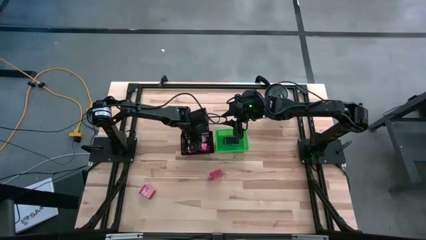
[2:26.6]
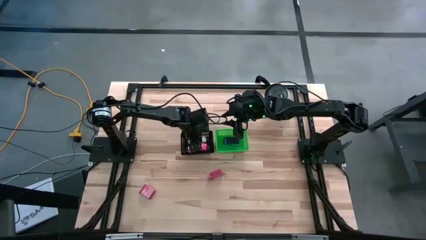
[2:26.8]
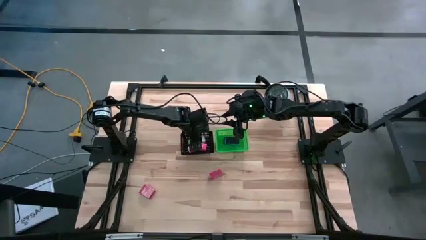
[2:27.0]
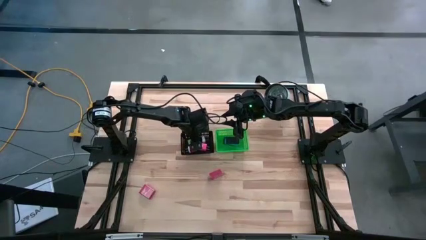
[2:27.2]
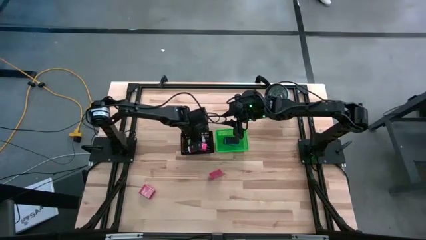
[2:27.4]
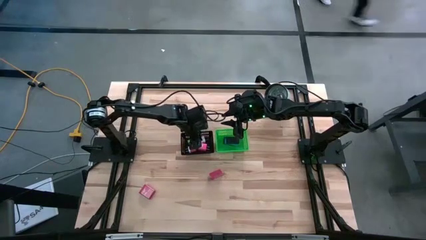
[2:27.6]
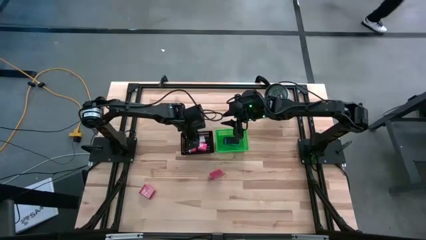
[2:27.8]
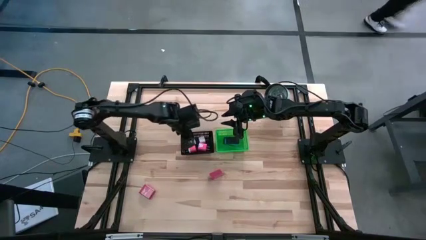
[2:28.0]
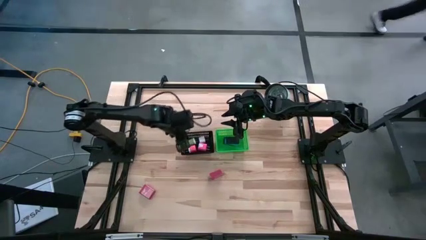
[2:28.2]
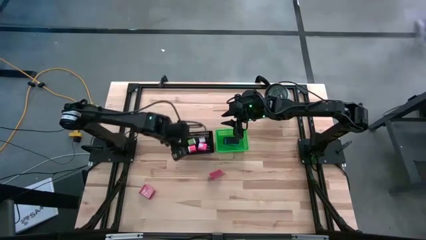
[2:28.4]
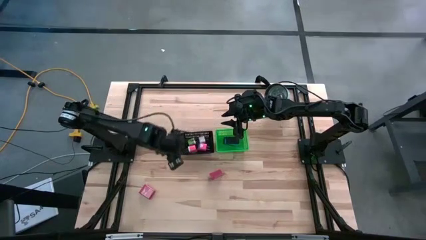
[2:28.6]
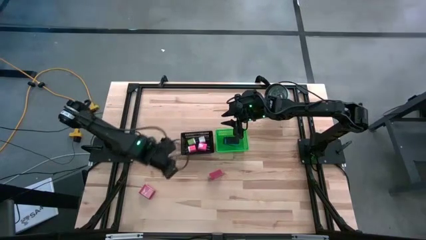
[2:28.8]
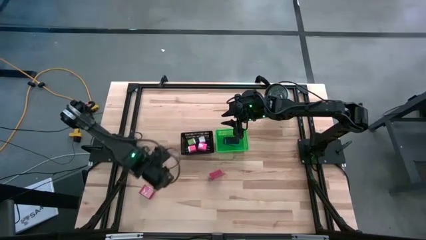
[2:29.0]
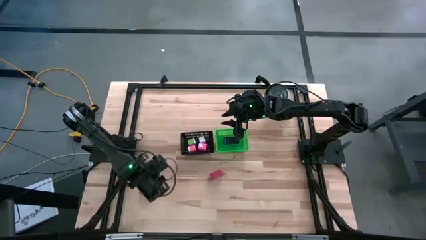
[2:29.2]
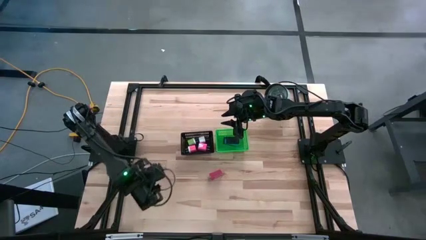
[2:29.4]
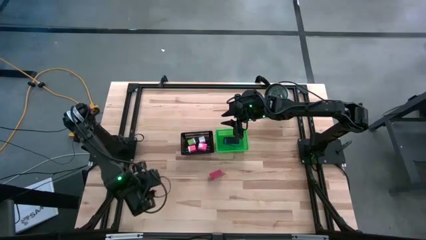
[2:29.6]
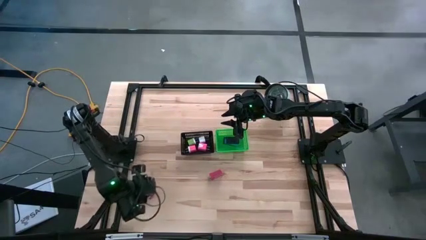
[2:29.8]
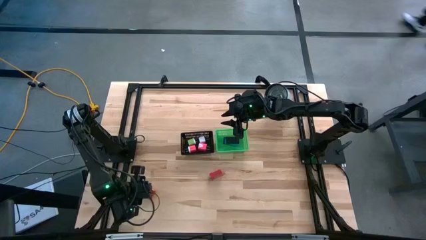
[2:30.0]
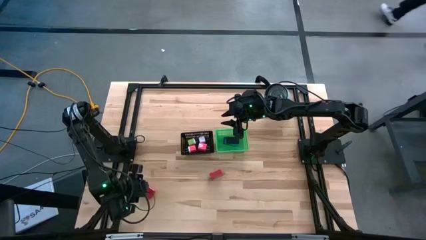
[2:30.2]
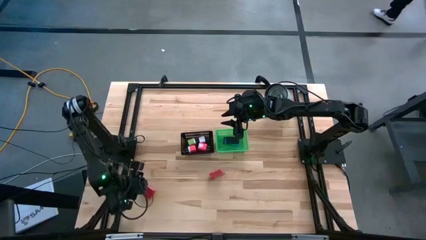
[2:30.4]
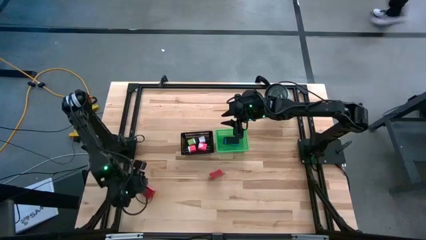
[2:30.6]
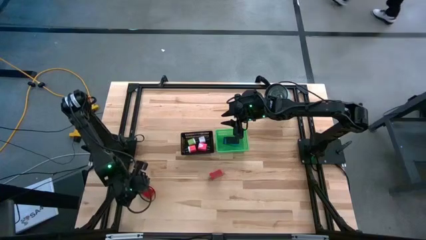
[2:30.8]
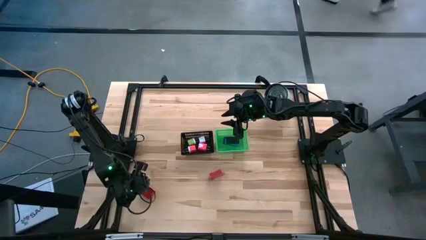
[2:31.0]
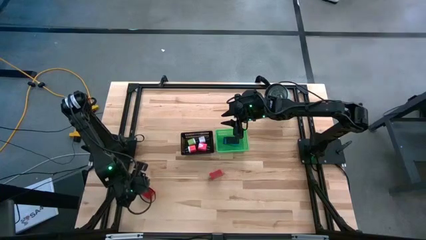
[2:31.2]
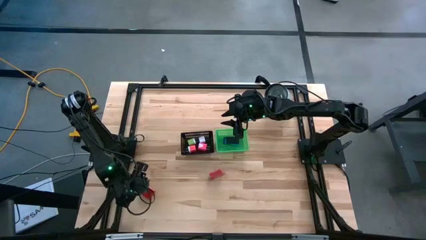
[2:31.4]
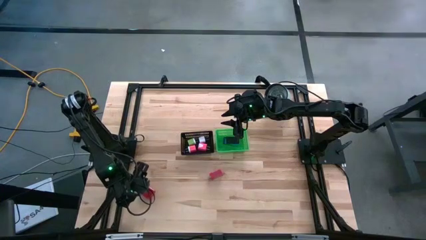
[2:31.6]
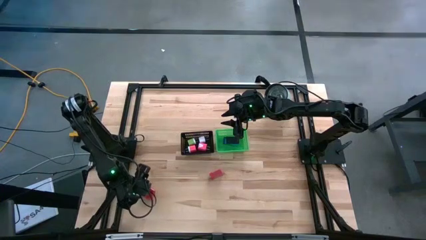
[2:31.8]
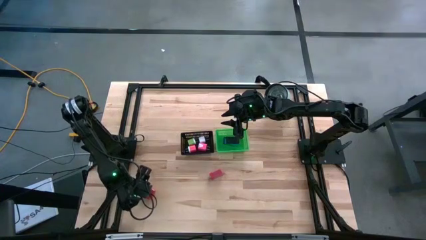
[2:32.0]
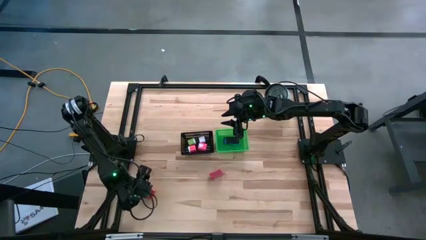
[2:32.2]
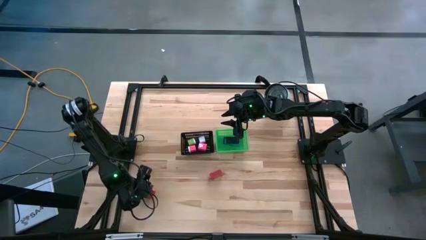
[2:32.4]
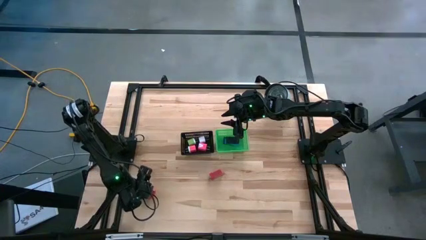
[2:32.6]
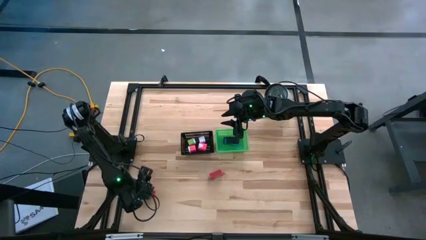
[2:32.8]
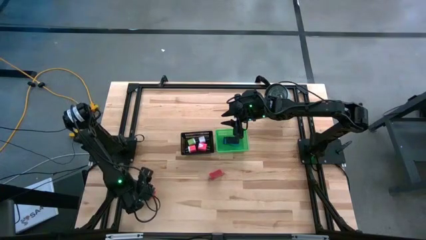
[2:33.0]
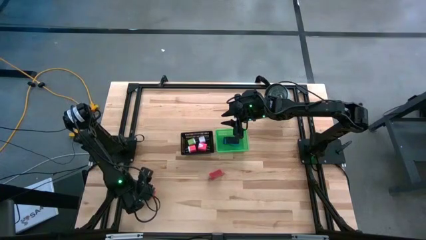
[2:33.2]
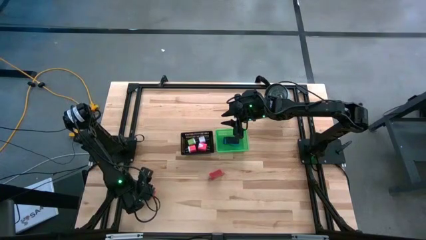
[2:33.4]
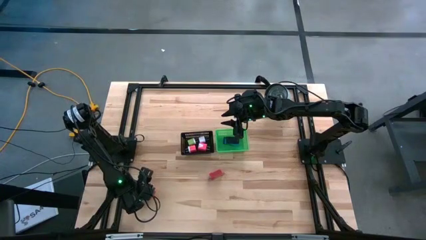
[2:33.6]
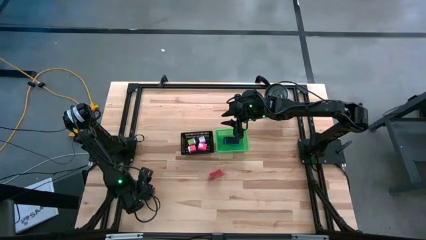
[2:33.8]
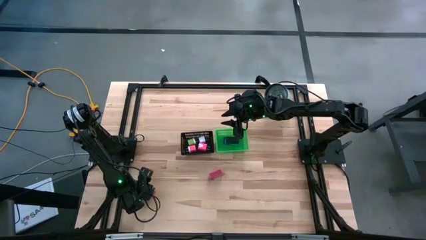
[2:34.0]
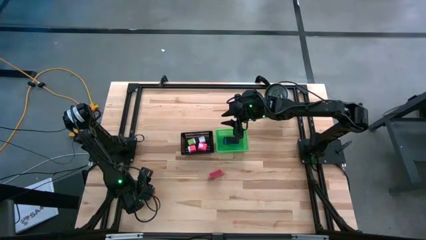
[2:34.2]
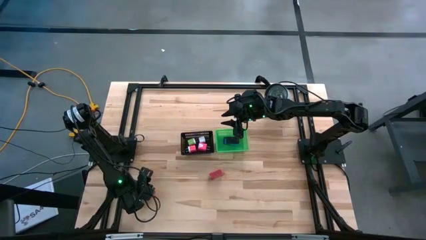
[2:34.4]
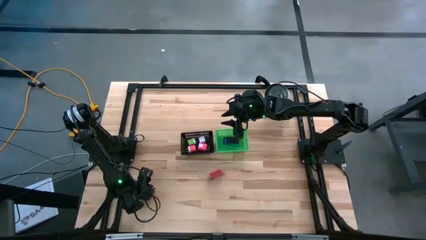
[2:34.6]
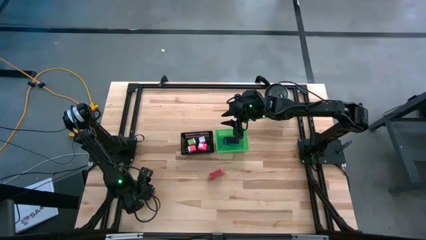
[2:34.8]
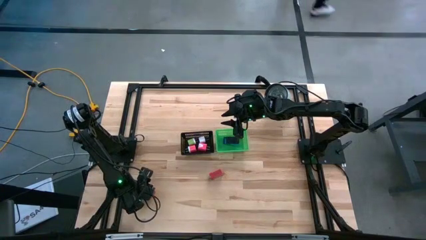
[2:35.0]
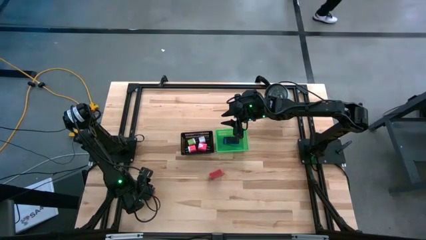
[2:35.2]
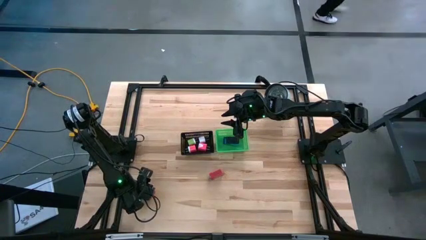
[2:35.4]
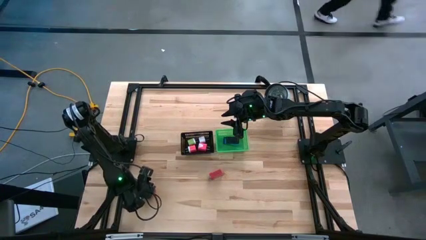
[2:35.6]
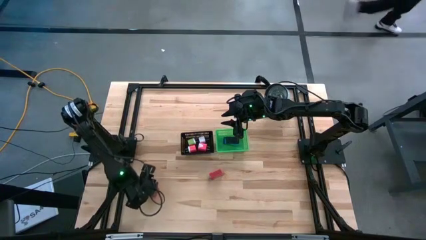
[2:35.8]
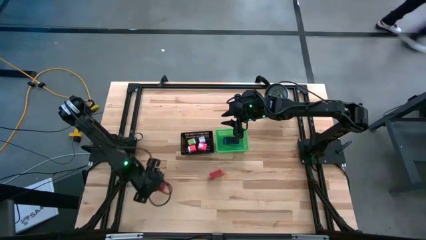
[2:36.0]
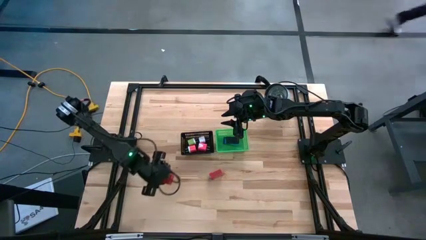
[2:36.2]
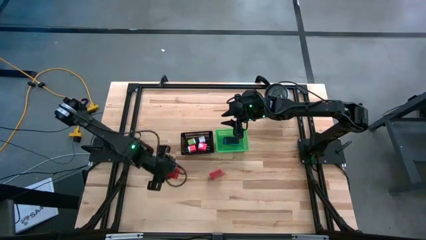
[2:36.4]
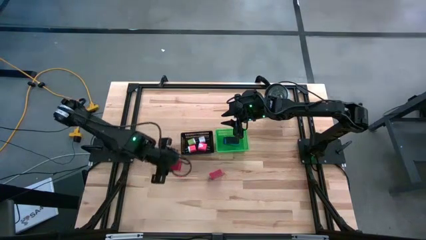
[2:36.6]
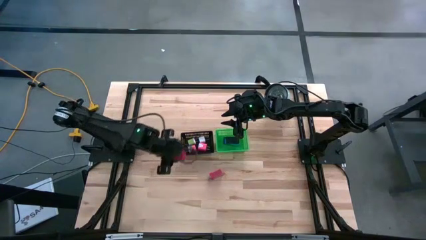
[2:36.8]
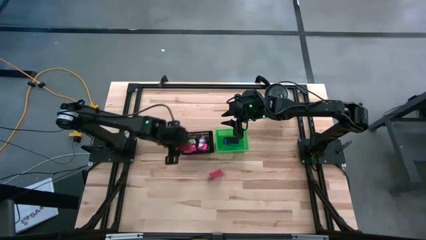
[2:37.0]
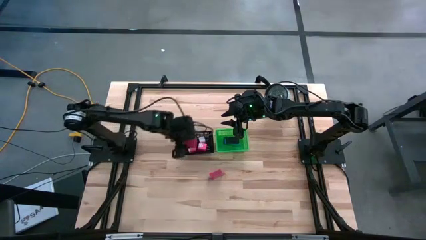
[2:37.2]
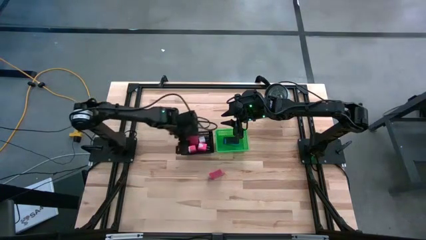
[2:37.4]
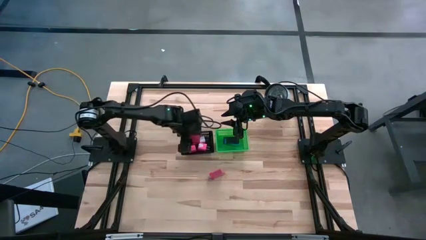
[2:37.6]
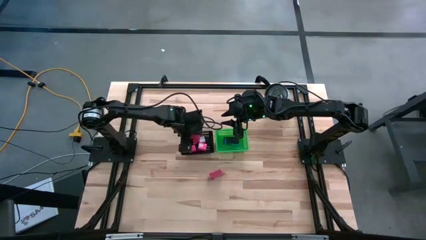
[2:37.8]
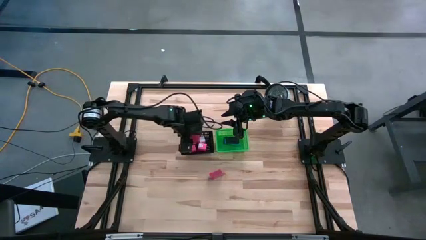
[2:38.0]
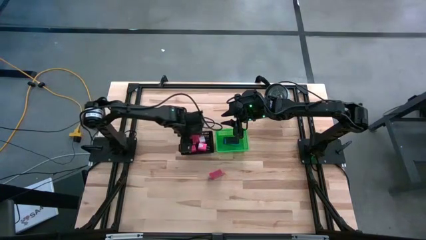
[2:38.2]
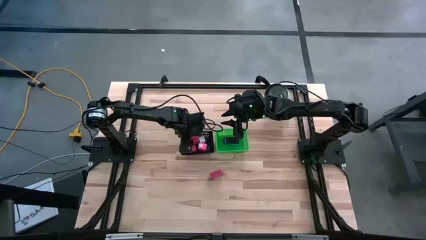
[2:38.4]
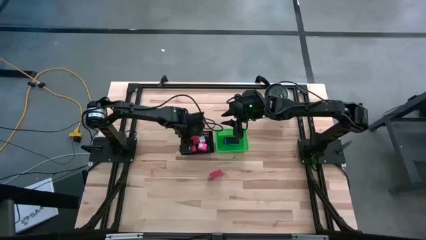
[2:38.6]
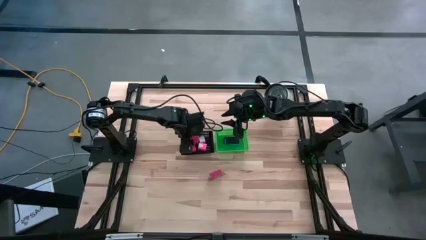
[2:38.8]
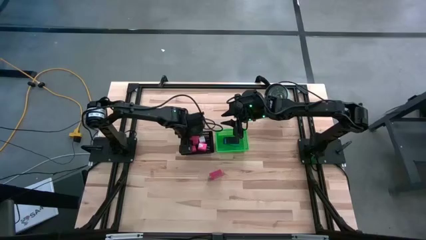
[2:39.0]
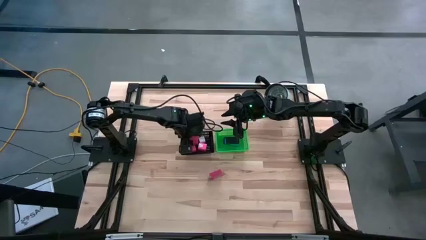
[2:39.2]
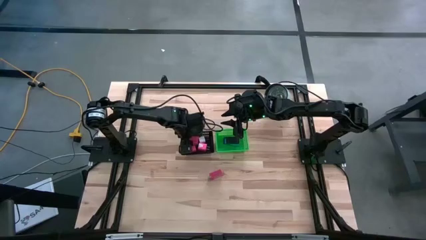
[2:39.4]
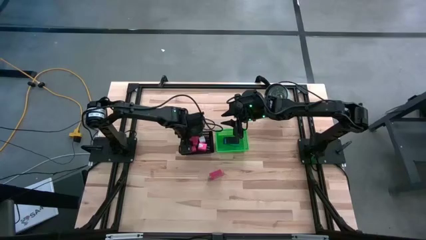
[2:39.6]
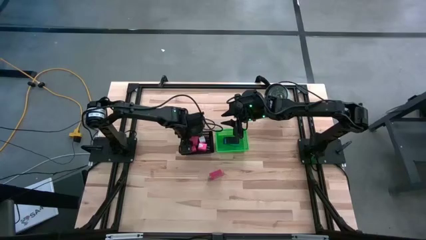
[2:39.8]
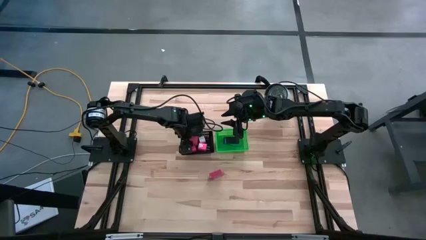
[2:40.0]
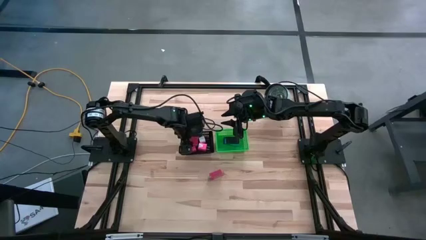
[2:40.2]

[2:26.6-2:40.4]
Task: Pick & Place Office items
Put the left red charger adapter into the black bin

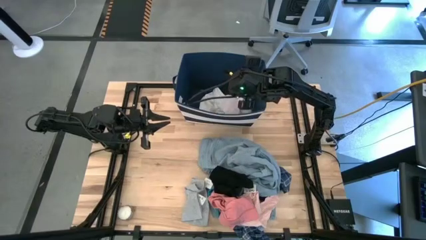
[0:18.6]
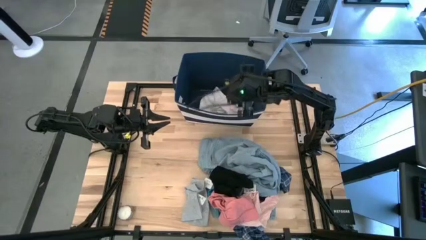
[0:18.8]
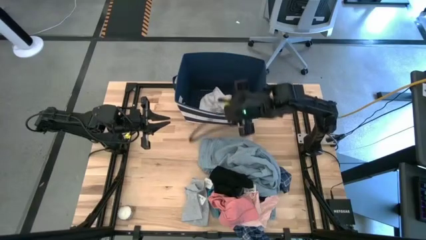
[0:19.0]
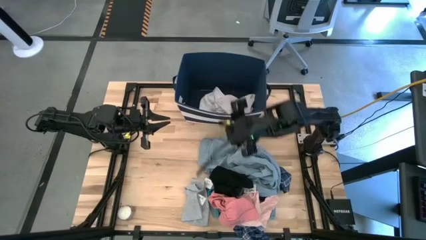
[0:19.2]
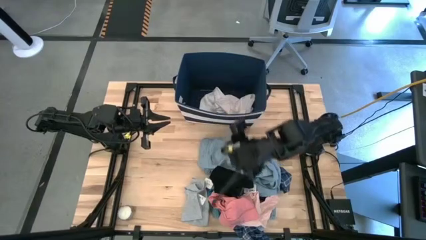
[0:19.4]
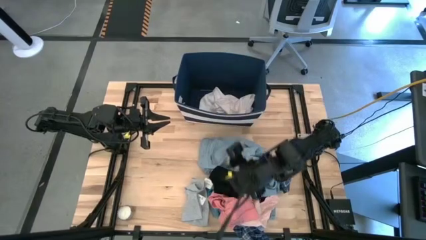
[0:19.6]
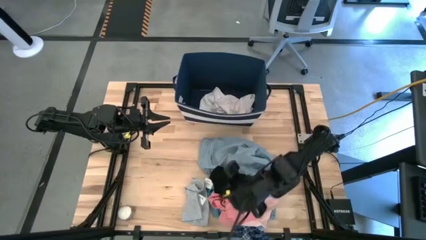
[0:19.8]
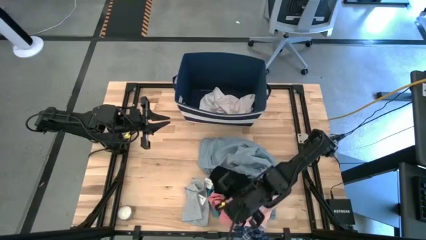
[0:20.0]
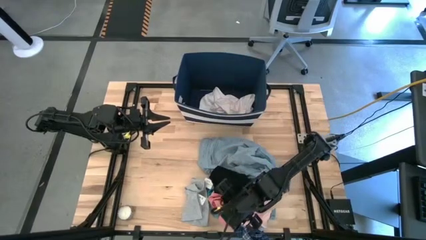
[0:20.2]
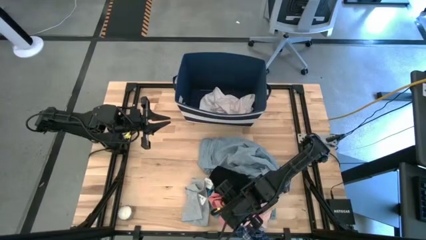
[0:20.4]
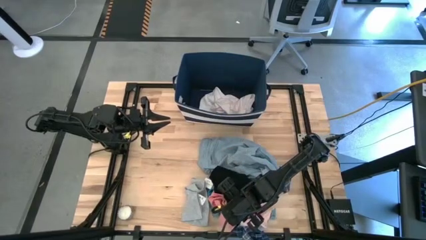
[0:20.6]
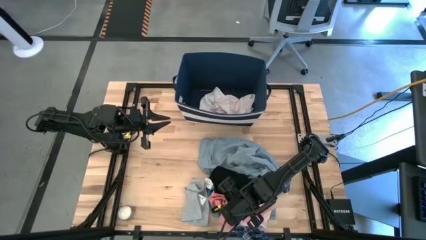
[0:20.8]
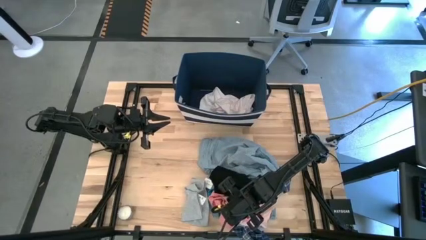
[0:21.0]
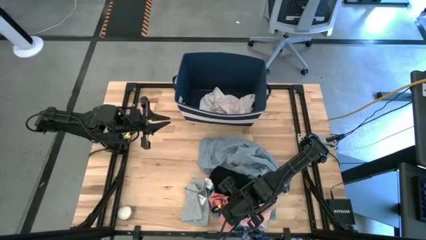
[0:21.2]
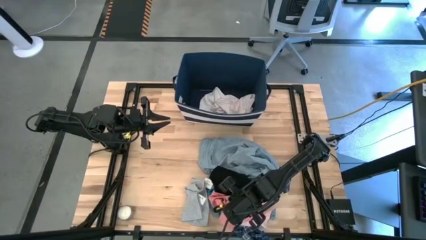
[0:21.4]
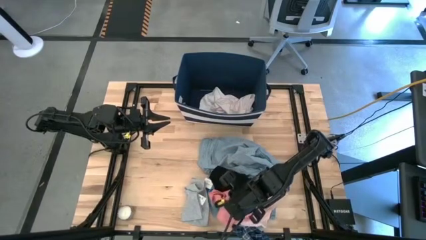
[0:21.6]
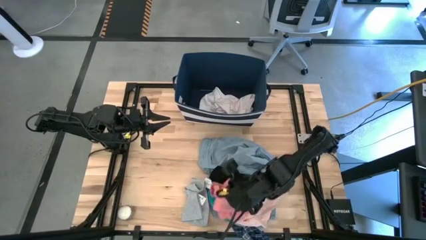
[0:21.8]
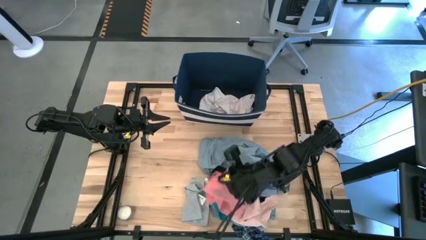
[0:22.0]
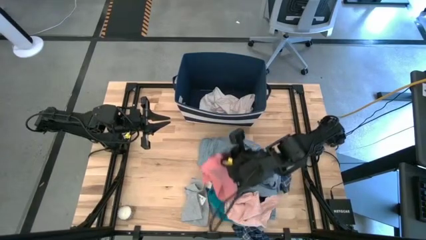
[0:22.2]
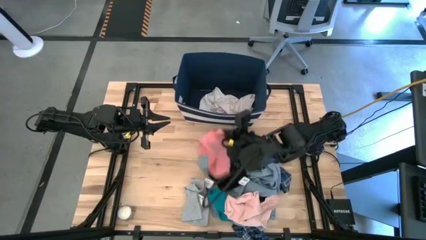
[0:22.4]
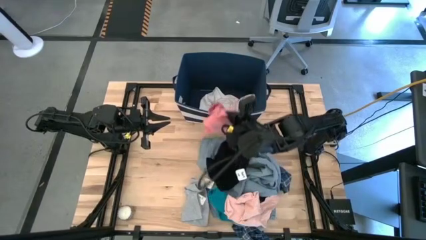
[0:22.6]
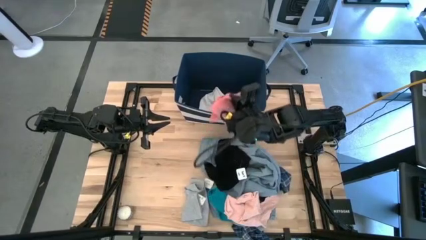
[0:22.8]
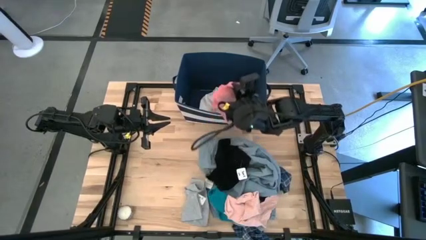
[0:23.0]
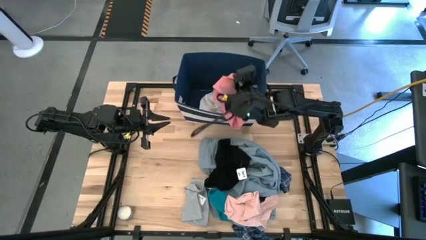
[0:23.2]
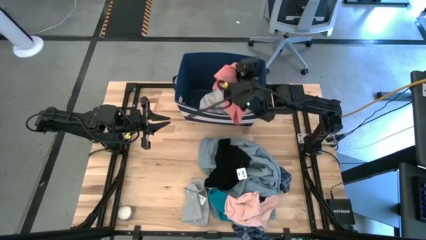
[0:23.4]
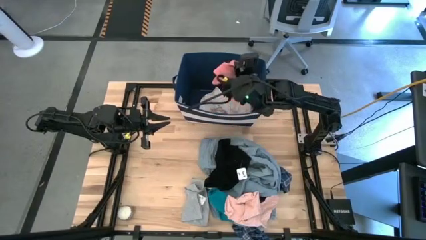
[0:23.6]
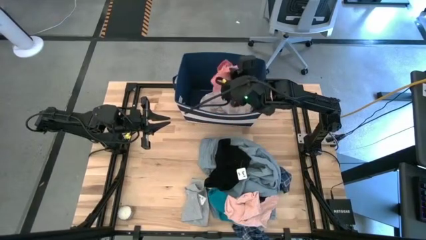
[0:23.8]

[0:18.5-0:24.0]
Task: Sort clothes
Put the pink underwear into the blue bin
